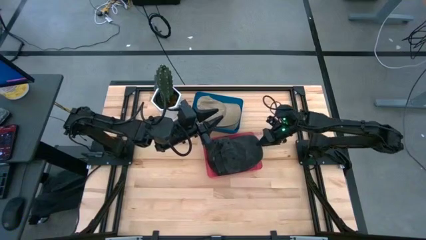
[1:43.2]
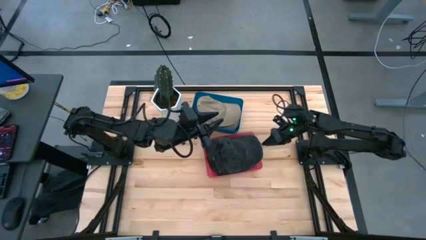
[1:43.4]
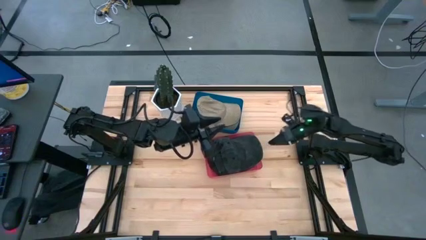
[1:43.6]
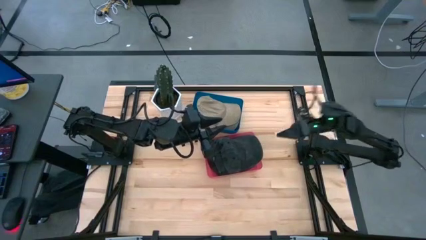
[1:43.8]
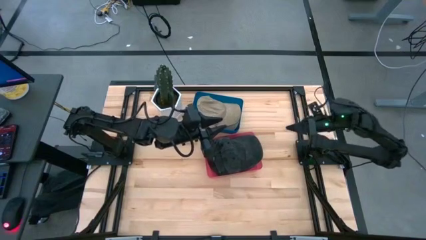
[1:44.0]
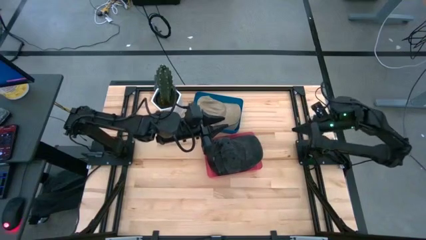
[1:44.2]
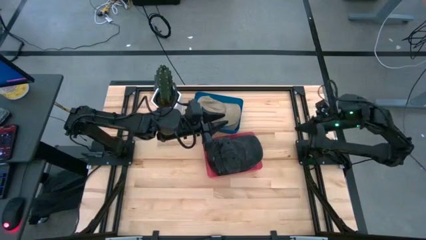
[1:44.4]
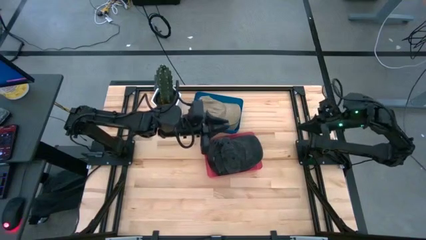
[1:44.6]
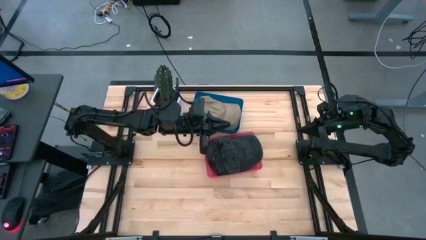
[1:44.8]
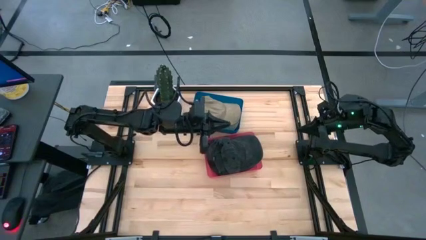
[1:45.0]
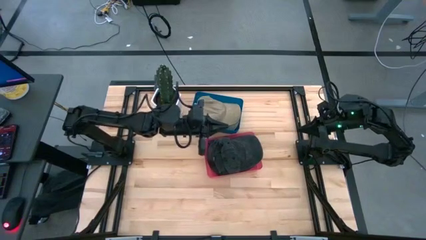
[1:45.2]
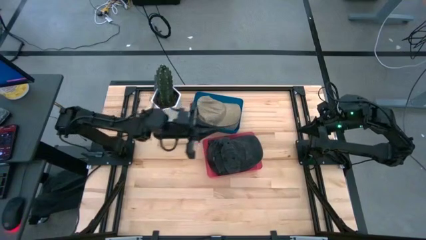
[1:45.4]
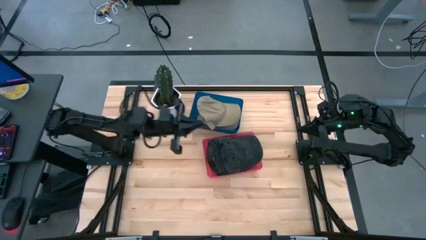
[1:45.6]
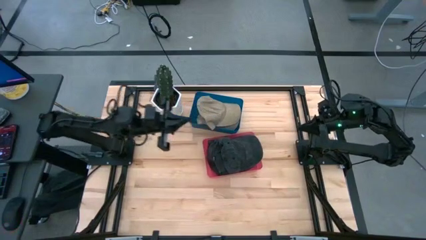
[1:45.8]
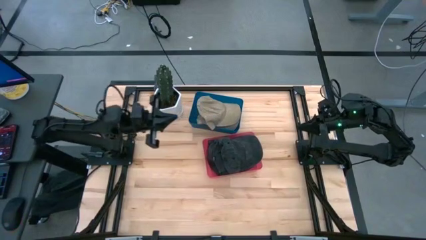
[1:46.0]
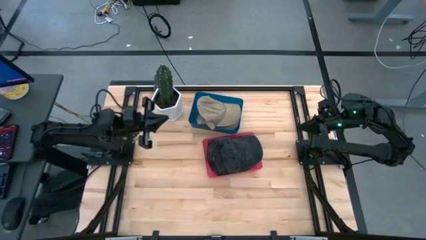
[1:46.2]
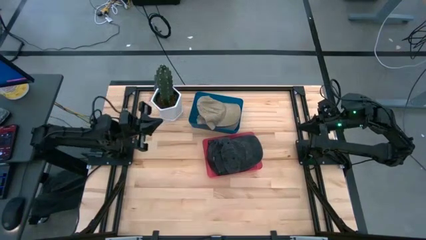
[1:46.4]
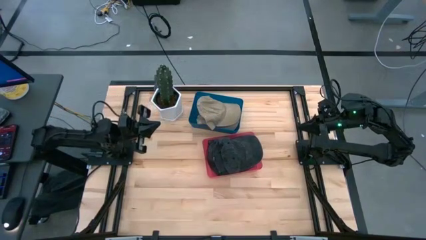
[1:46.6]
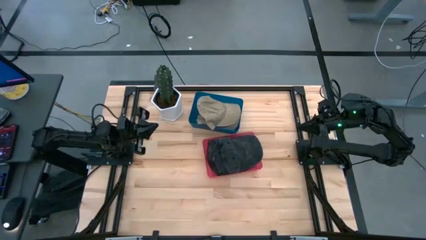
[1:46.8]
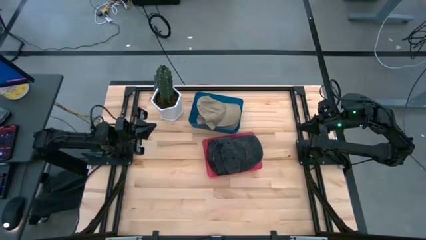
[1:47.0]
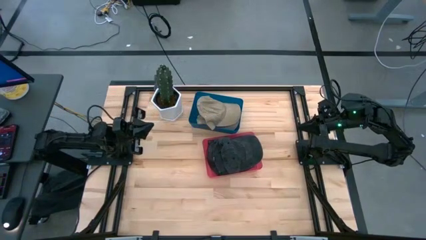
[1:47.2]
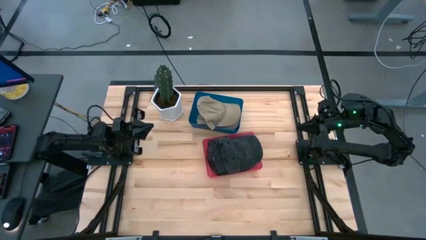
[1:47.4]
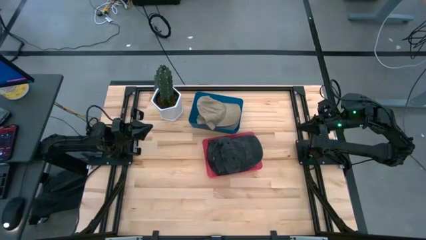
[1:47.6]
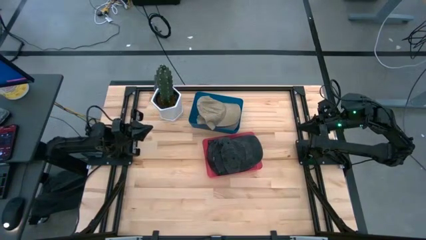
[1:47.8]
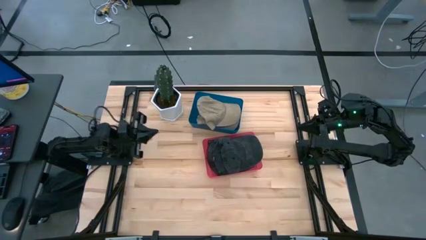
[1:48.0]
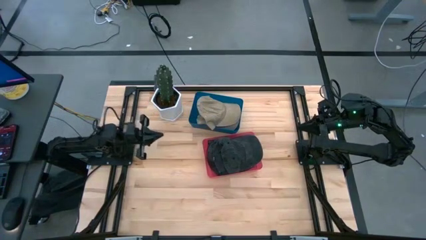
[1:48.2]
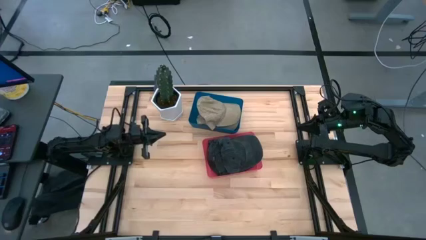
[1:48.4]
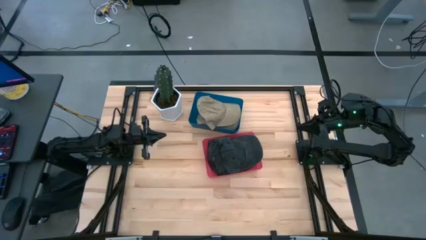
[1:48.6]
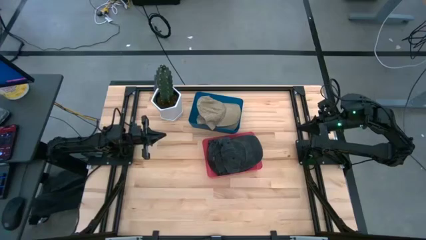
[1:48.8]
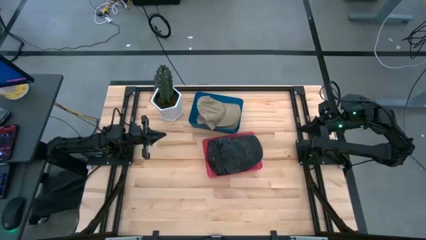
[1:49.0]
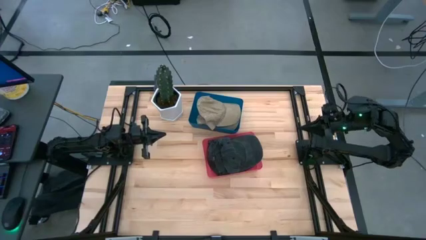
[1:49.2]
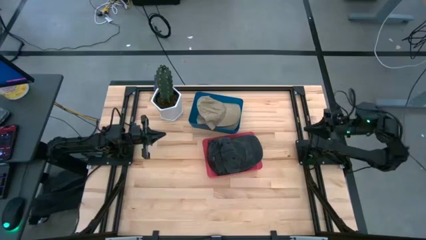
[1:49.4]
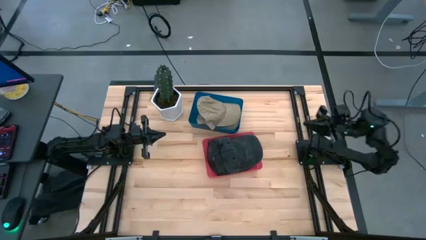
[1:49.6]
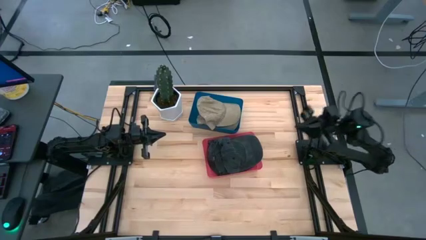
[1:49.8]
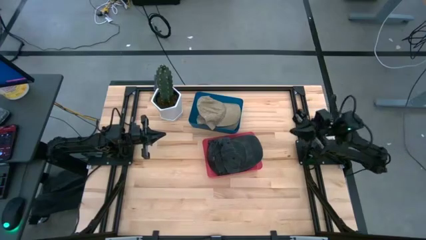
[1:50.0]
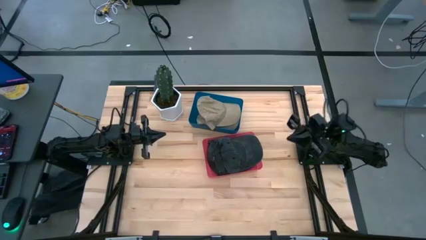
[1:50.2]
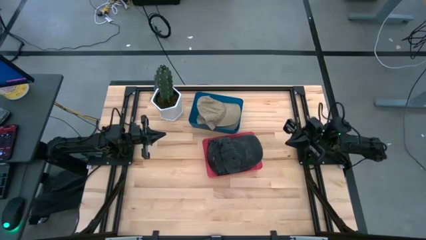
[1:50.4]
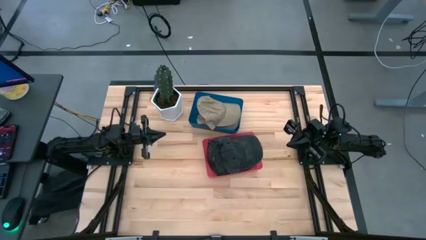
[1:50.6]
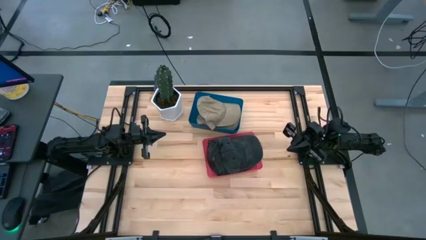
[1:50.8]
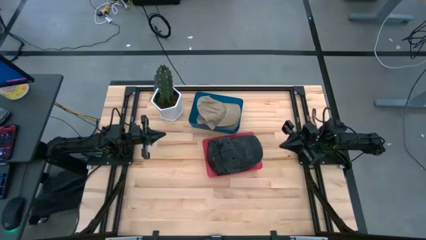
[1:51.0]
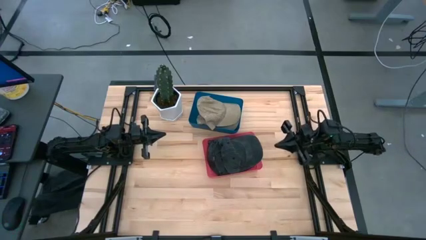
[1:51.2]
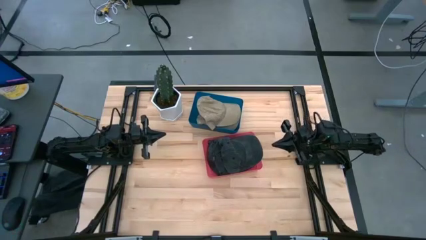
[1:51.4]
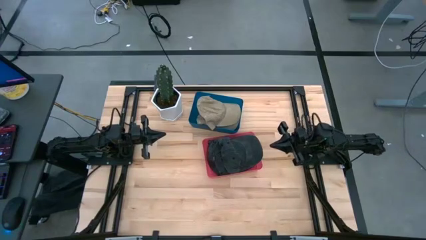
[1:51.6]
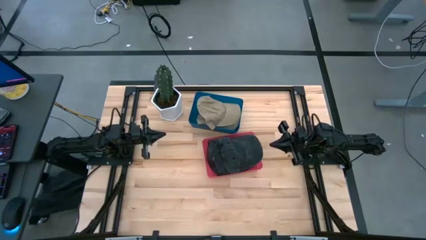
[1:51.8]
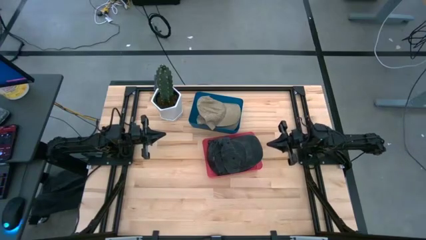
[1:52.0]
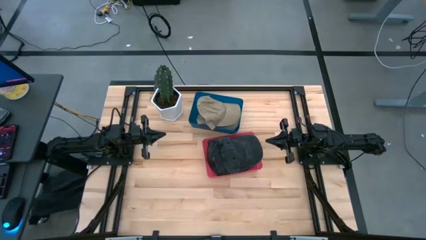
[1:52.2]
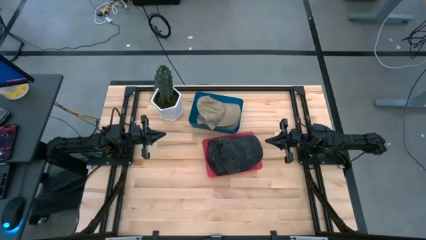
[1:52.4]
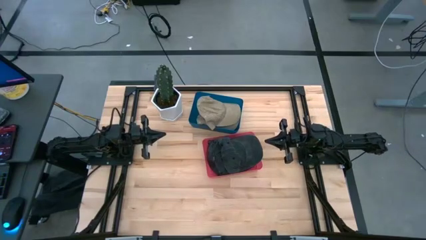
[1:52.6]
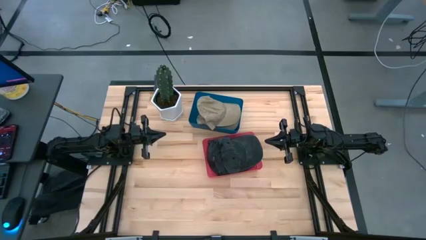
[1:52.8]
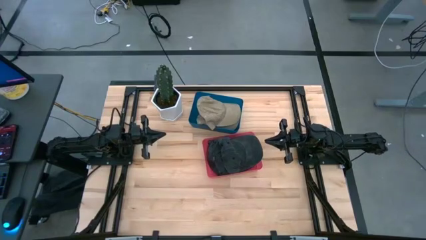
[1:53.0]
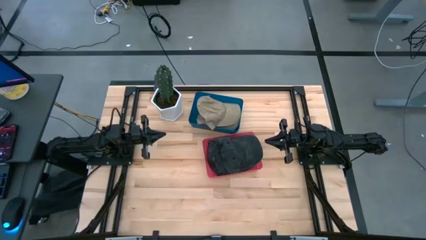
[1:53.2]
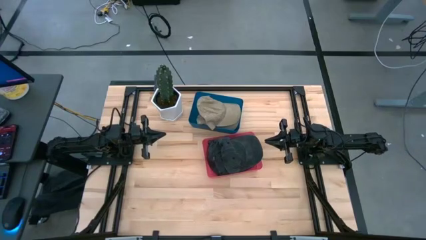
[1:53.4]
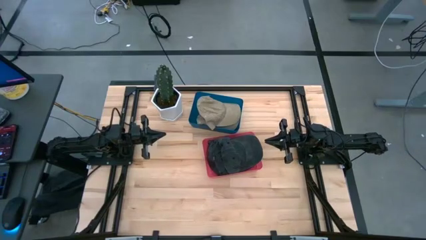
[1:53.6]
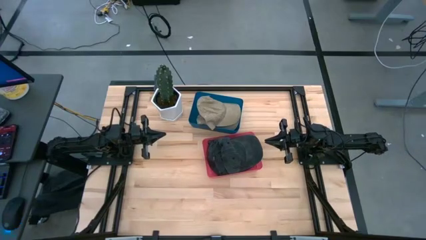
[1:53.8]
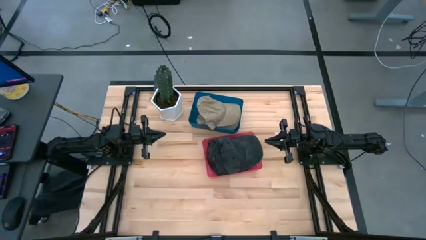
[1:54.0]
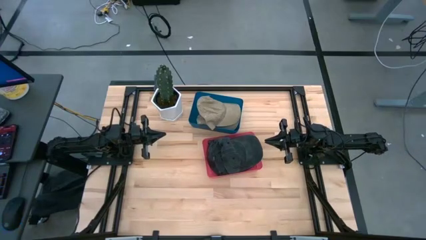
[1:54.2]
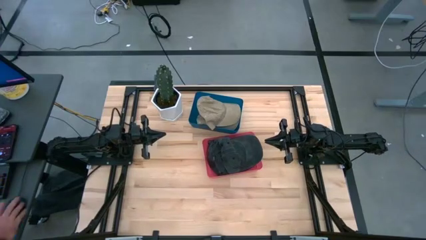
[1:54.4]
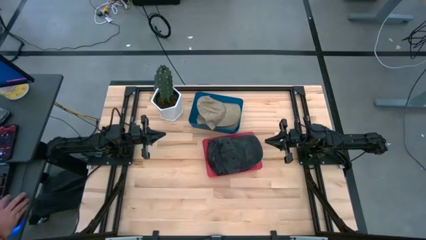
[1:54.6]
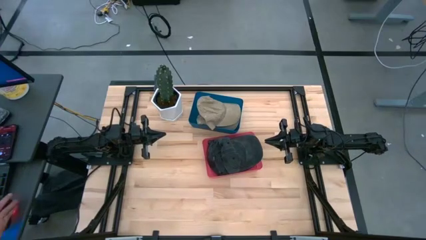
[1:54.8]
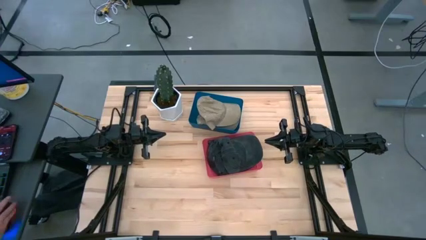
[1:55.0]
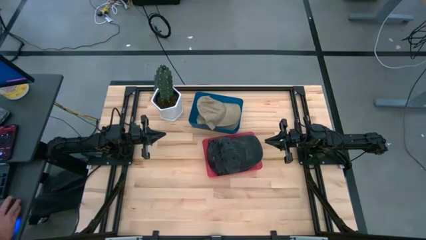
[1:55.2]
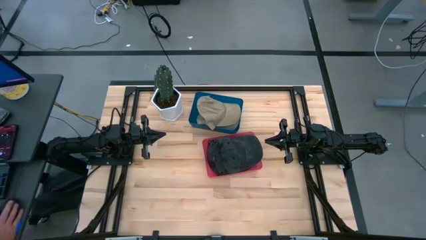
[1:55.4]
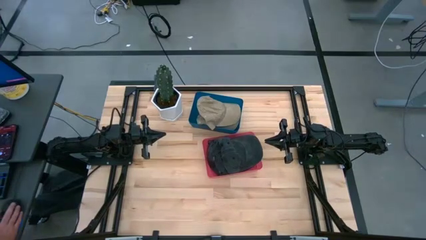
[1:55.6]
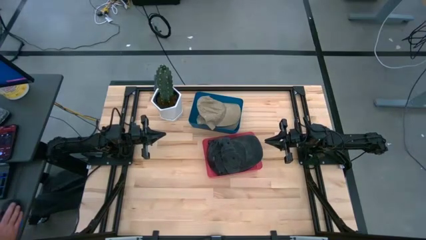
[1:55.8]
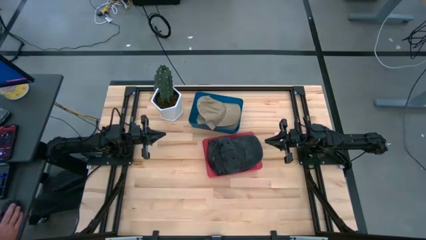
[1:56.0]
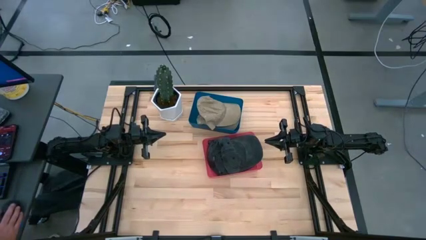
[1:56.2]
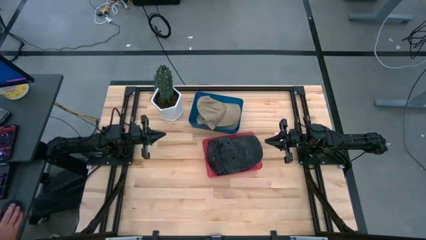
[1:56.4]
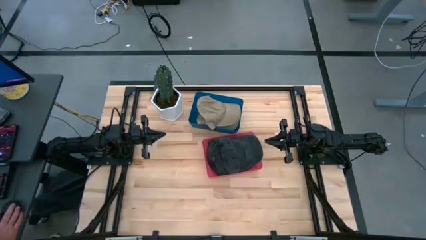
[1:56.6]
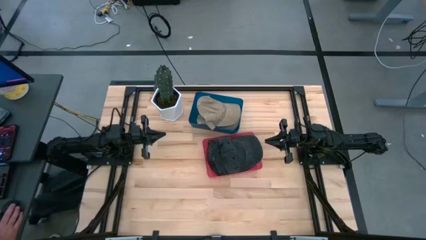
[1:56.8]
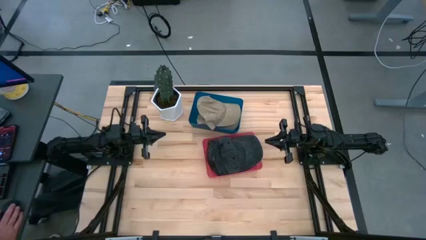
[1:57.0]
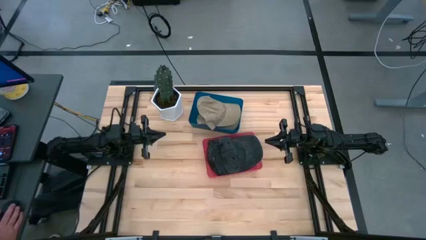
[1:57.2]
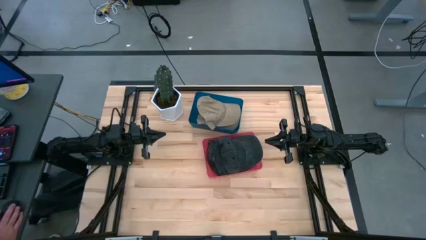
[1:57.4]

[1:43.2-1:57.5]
Task: Pick & Place hat
Return to Home Position

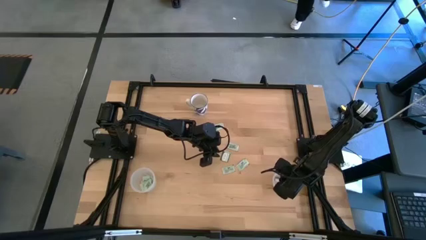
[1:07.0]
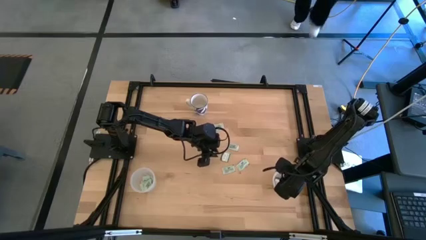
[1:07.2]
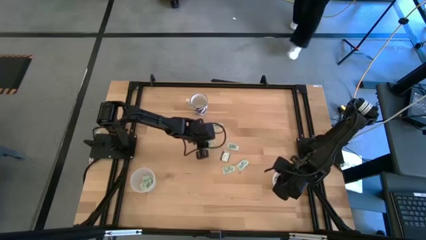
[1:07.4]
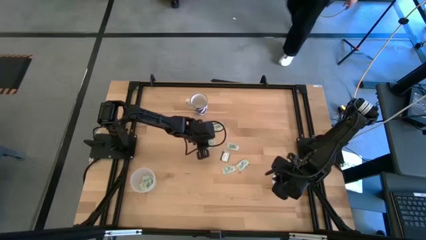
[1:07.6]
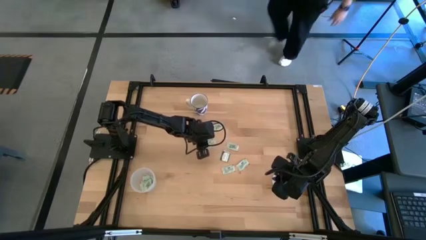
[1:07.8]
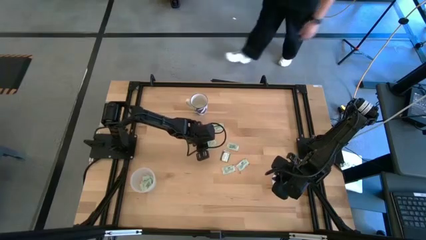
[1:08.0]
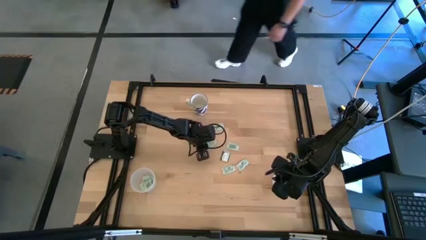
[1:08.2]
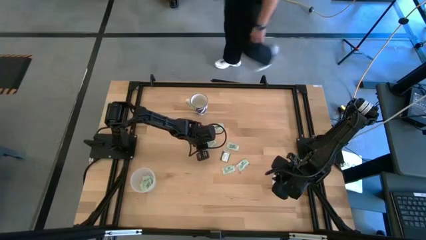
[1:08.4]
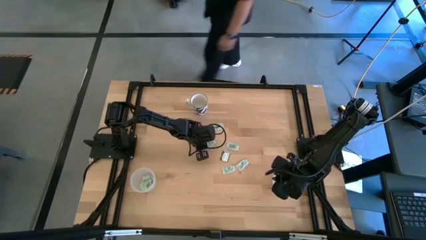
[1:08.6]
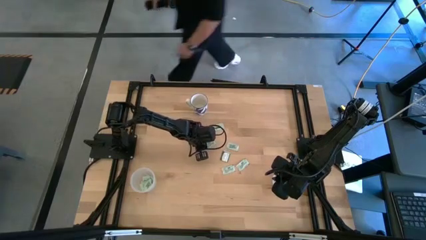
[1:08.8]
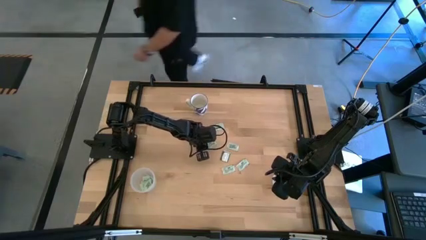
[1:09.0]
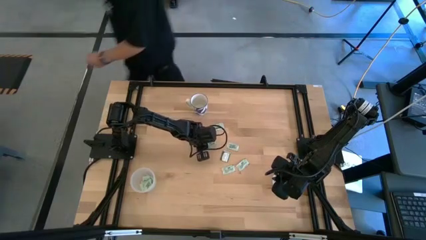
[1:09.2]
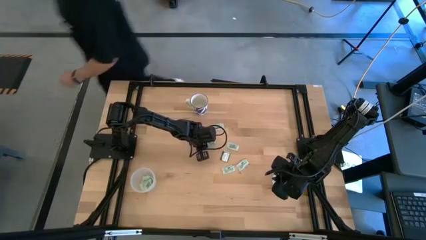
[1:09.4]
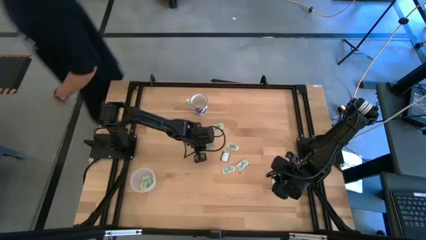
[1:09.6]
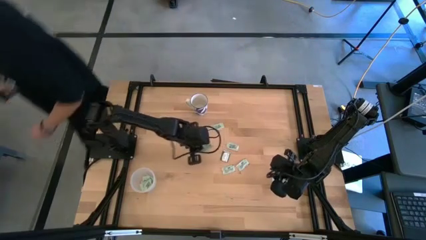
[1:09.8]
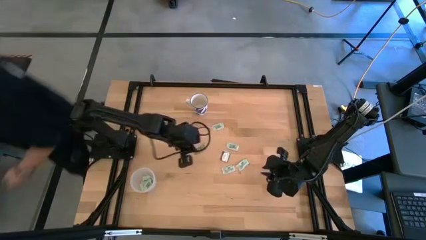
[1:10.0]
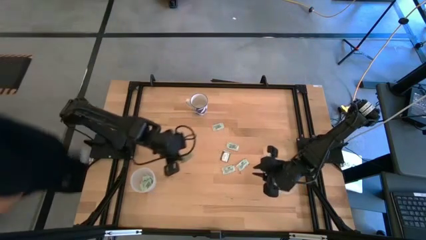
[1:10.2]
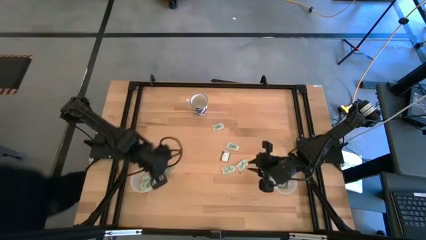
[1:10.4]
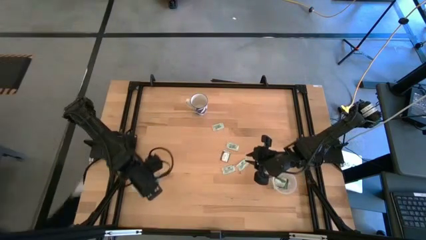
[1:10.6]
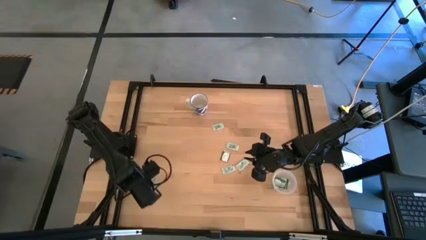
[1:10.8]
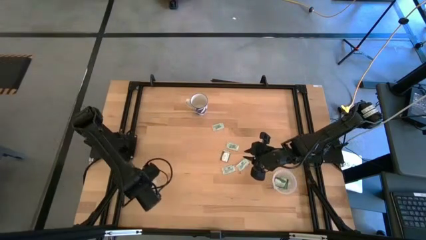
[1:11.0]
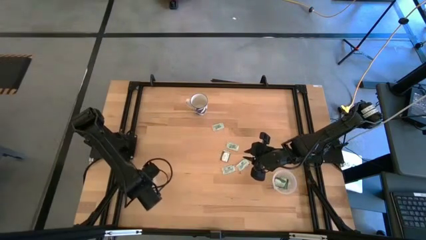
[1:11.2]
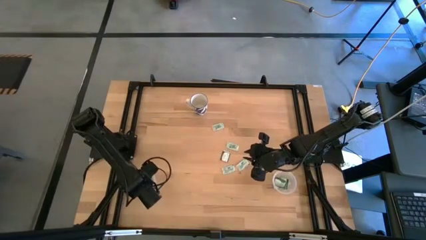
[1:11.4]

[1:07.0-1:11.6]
Task: Pick and place Stevia / Truvia into bins
Put the light green stevia packet into the left transparent container
